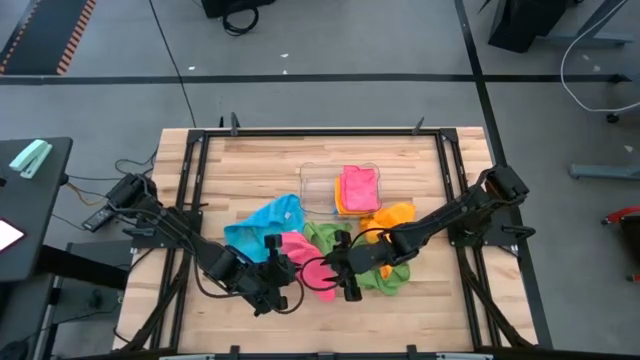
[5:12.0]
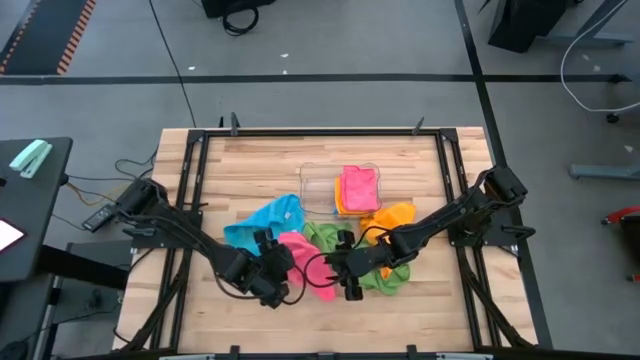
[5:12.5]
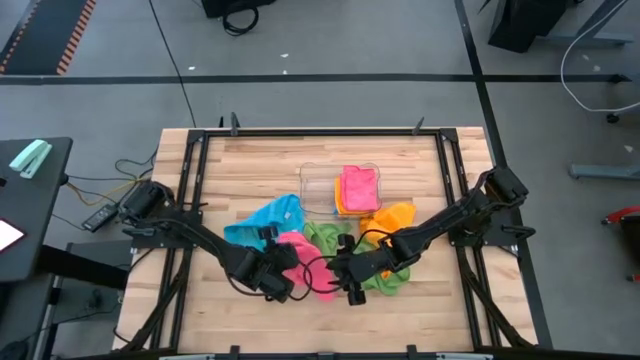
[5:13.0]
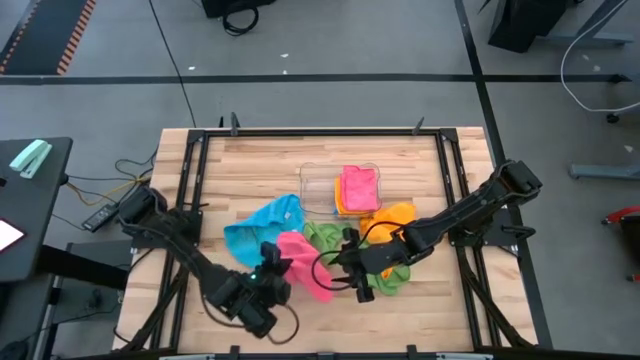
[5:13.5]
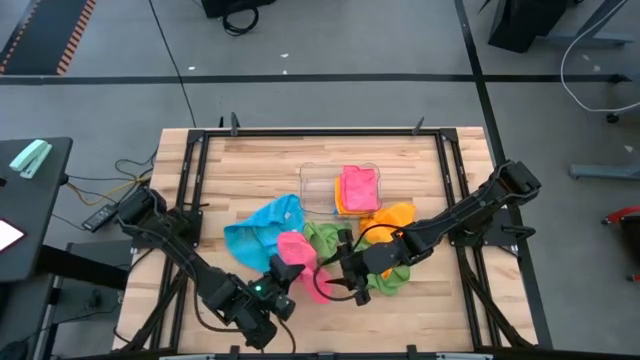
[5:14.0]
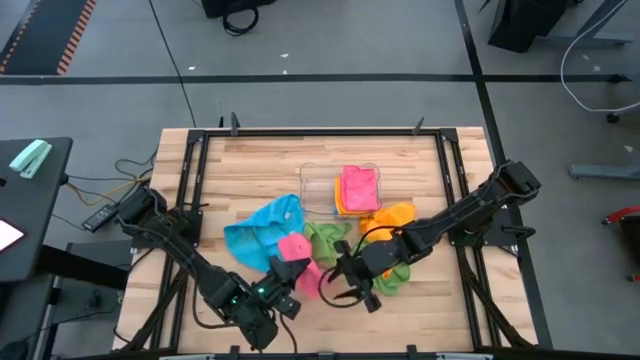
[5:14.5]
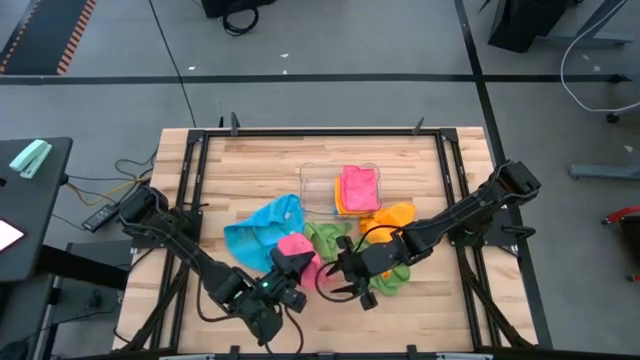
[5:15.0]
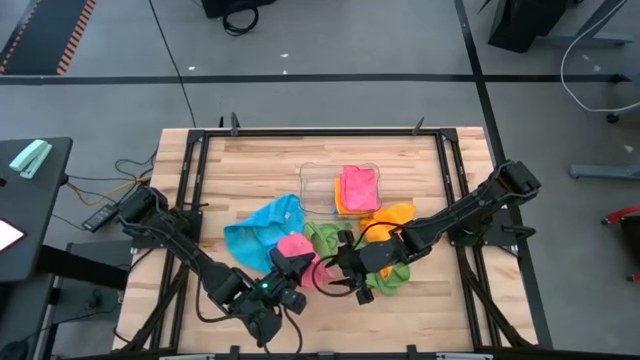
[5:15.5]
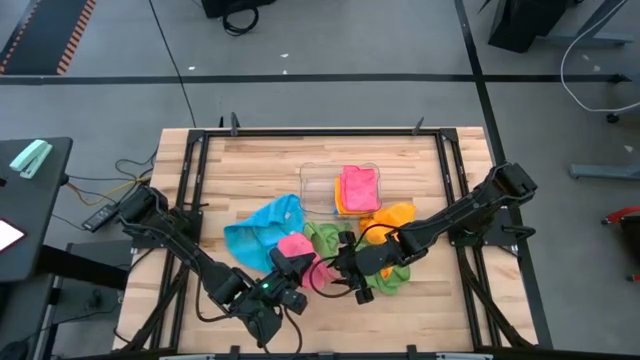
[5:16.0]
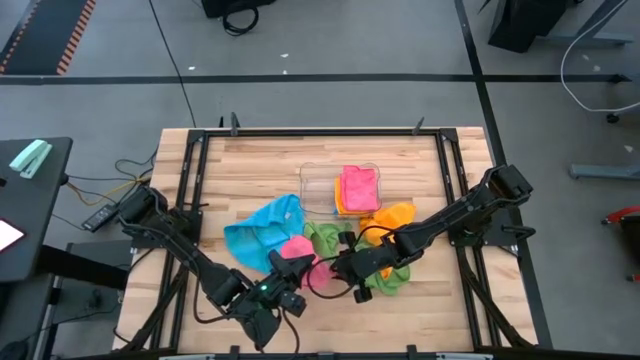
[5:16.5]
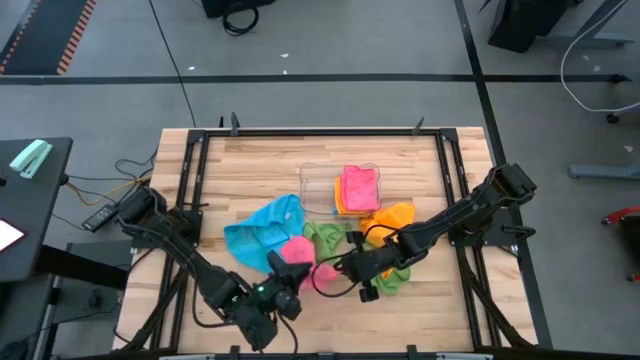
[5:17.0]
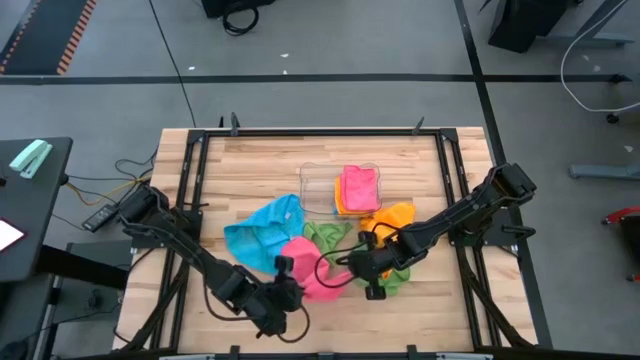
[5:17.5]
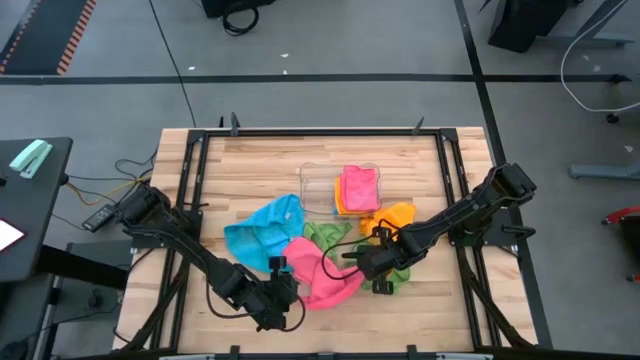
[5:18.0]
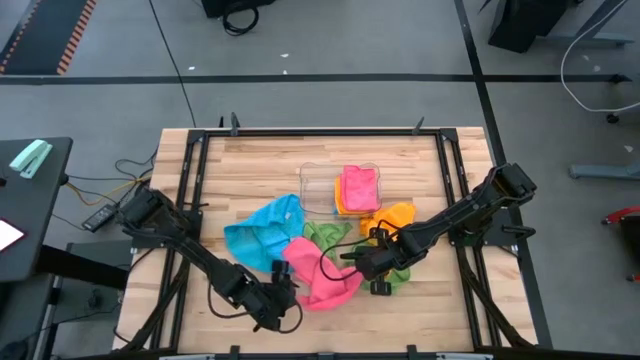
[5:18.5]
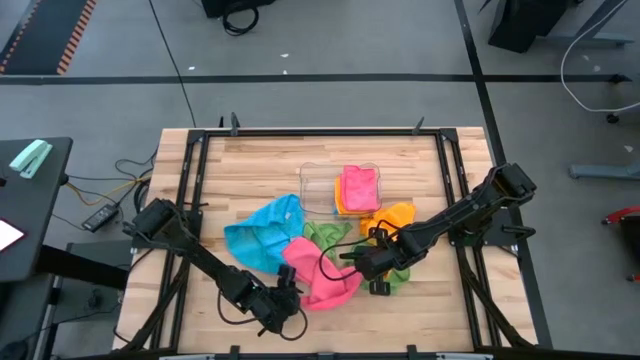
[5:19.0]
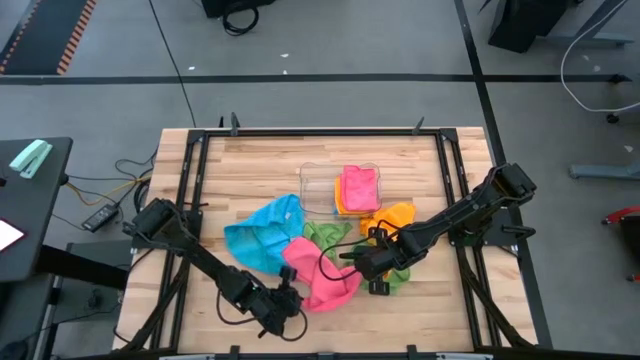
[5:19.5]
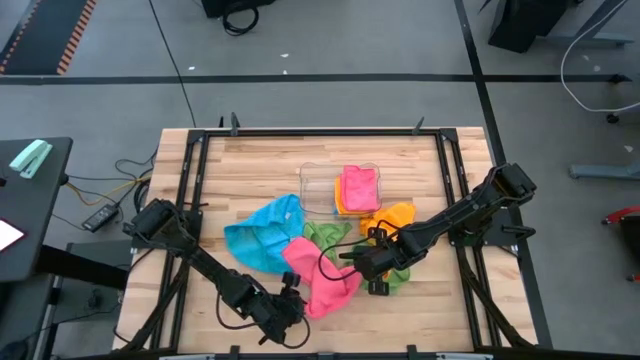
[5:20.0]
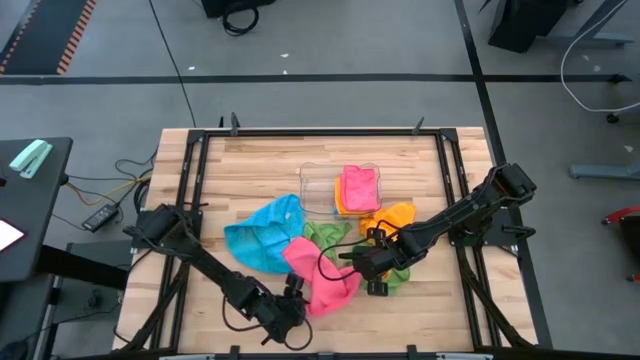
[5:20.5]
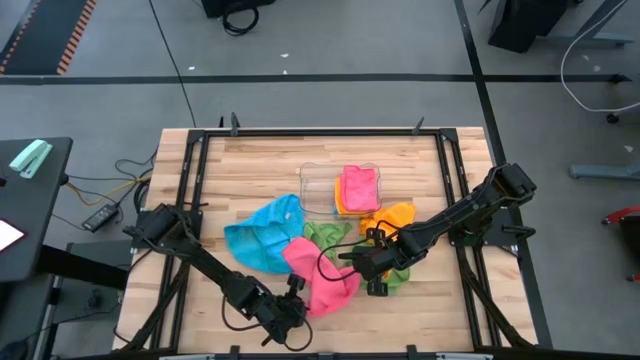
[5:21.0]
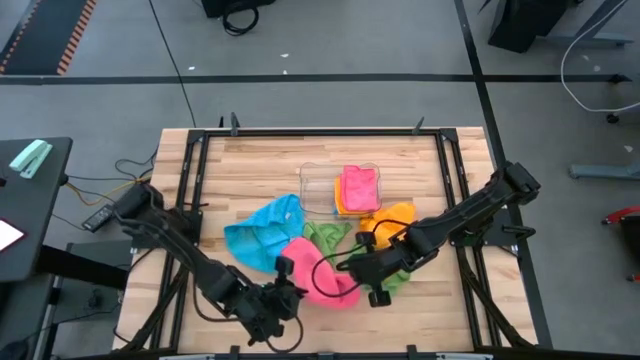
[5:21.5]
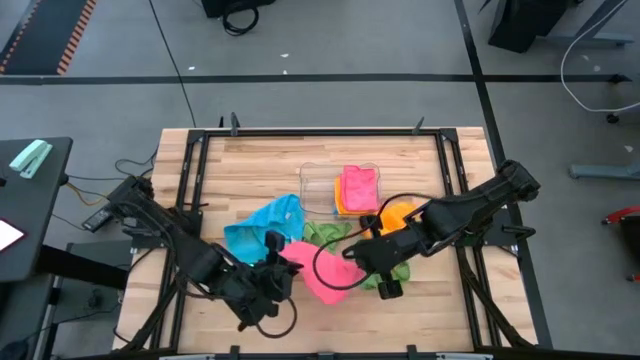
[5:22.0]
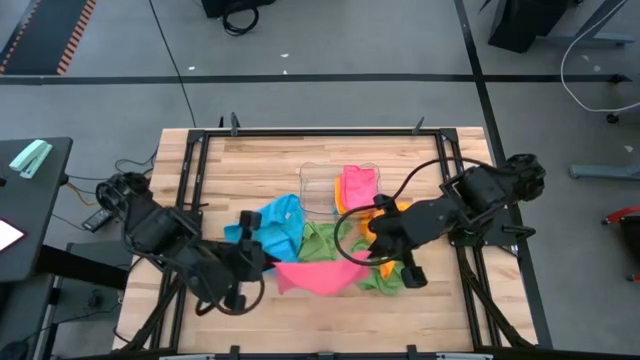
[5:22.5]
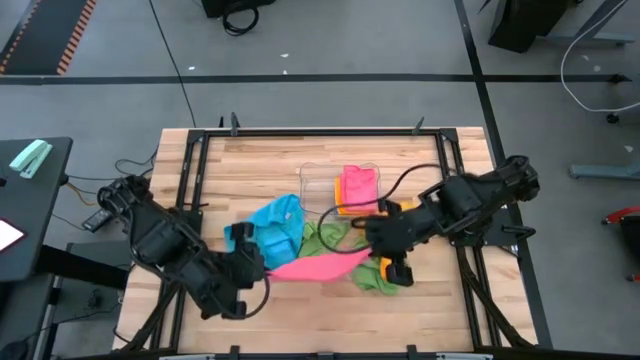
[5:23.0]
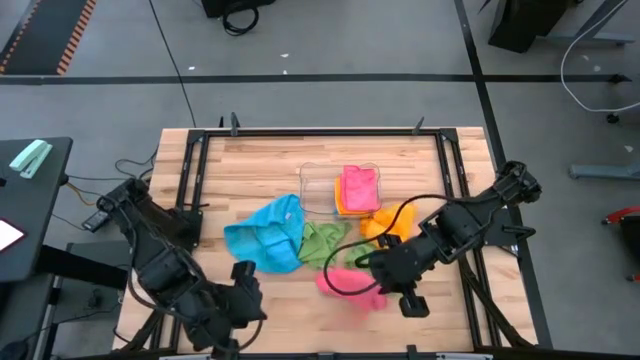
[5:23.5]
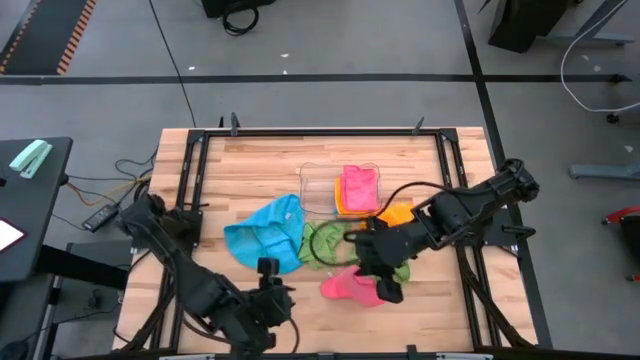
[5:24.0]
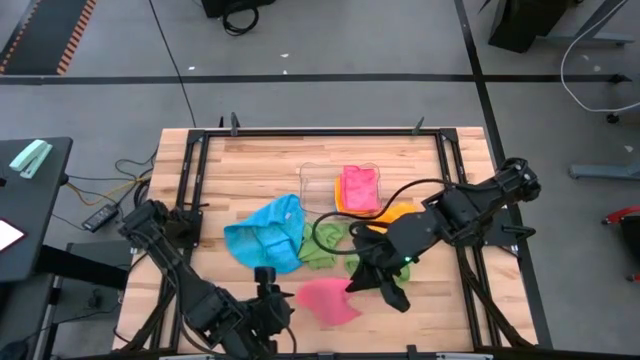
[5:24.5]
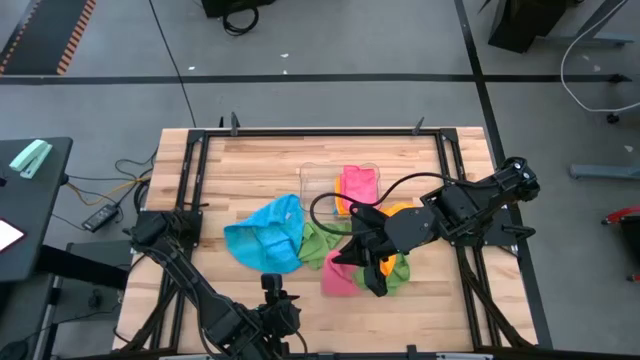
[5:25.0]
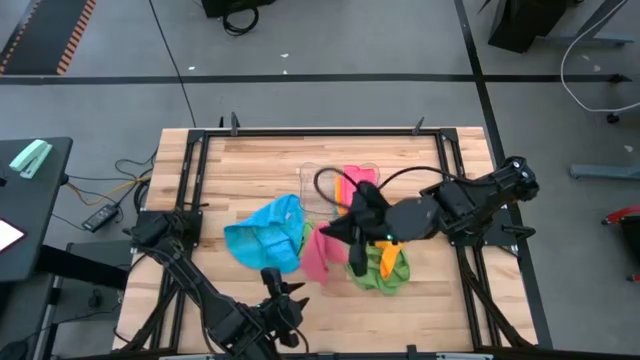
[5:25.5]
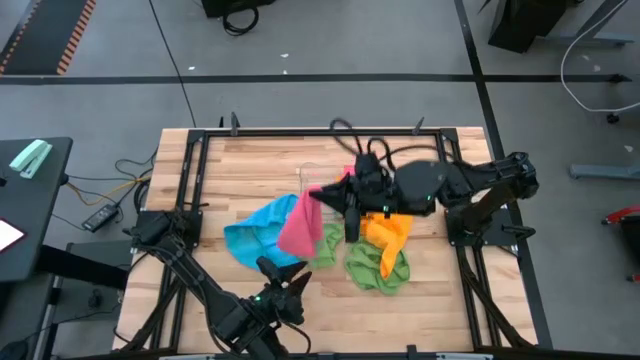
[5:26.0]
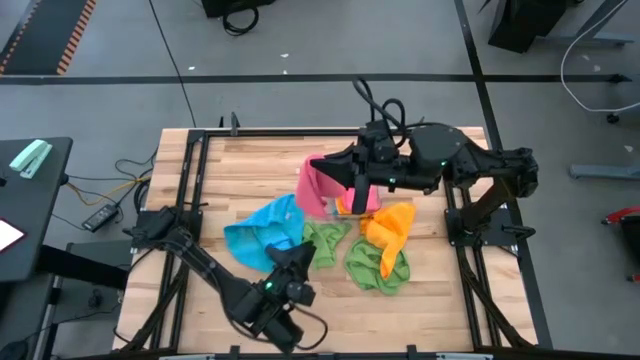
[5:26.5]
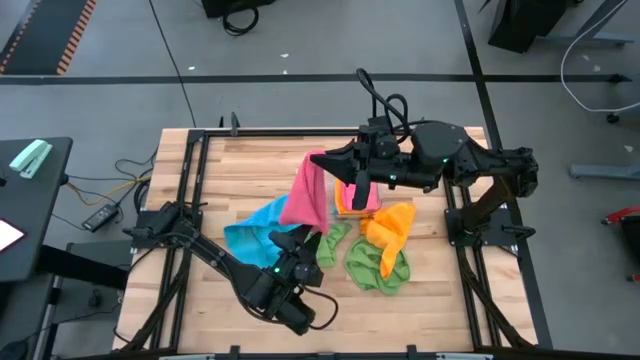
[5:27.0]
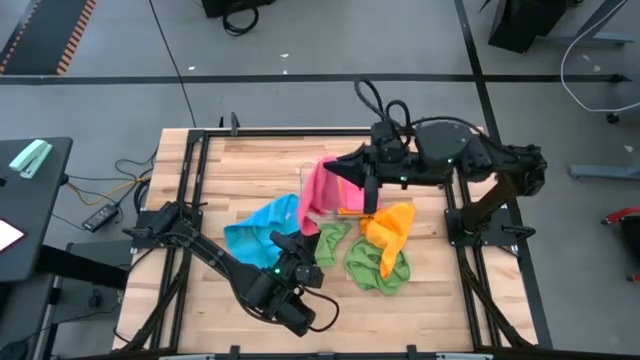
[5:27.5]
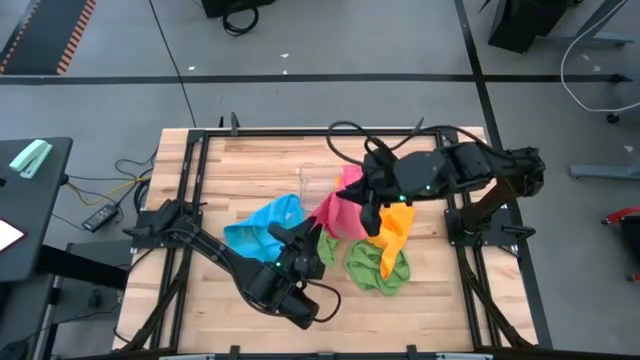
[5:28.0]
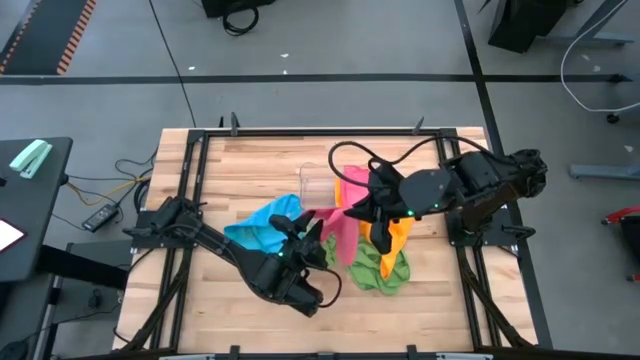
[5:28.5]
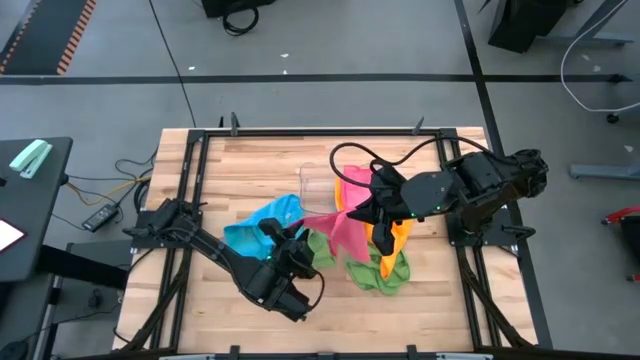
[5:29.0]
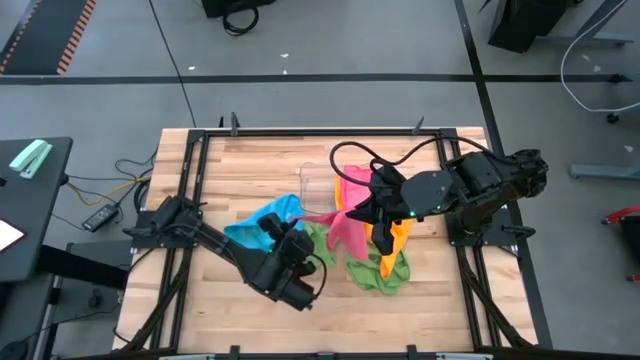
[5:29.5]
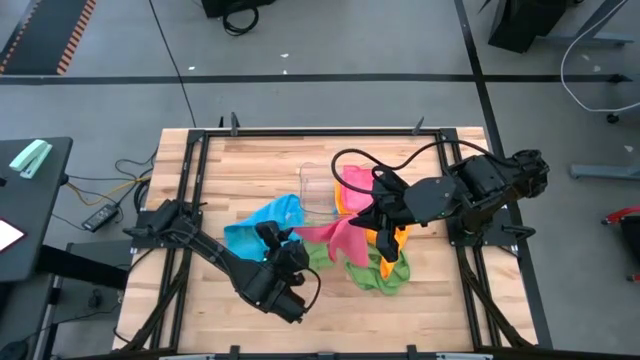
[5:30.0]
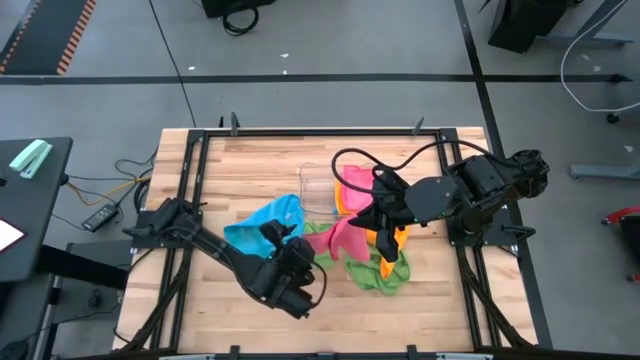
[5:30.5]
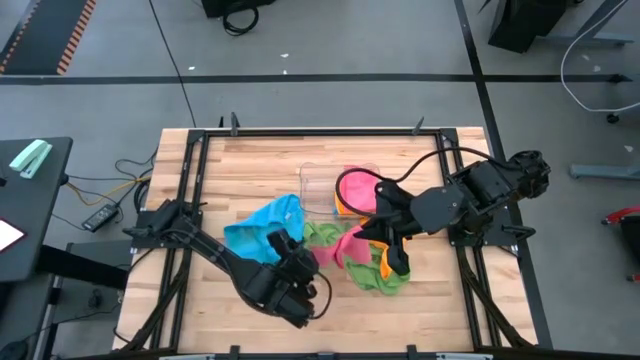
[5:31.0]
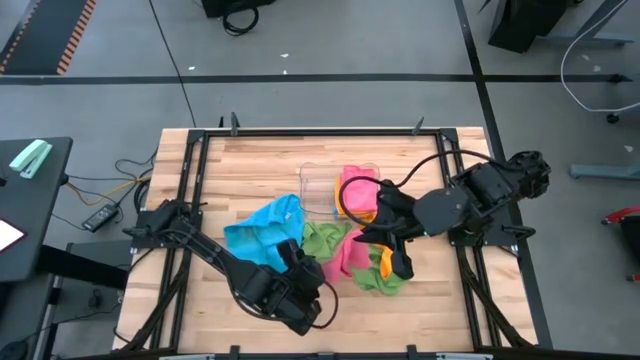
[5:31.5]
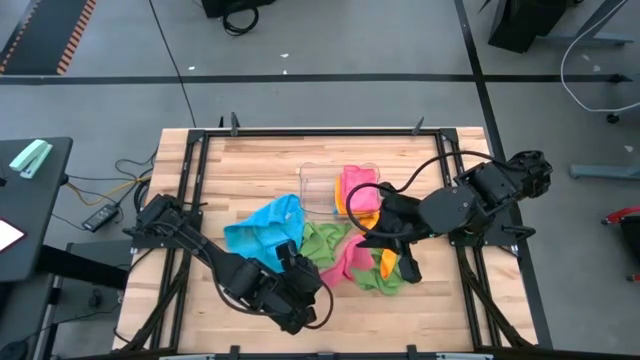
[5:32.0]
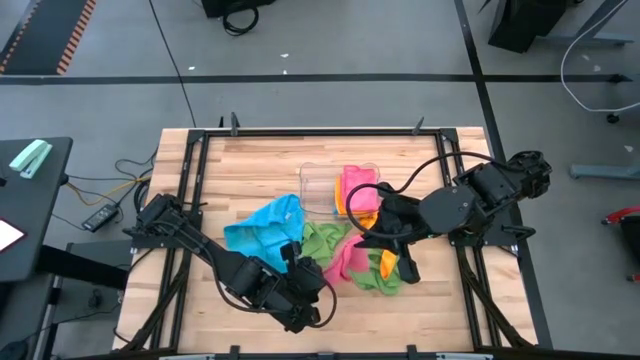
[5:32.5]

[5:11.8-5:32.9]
Task: Fold microfiber towels
Fold the pink microfiber cloth
